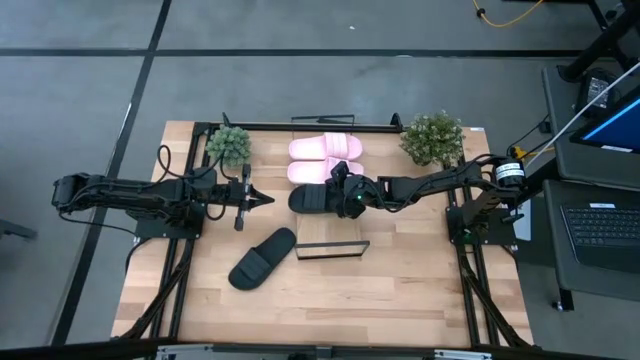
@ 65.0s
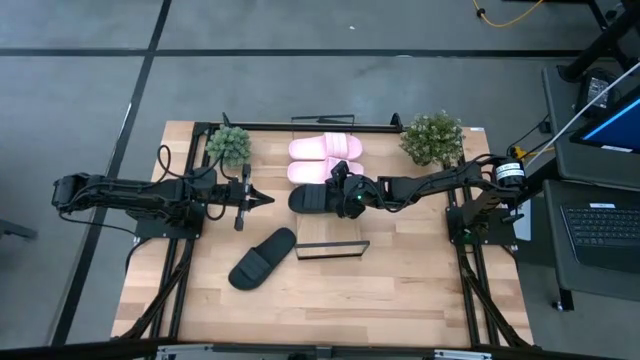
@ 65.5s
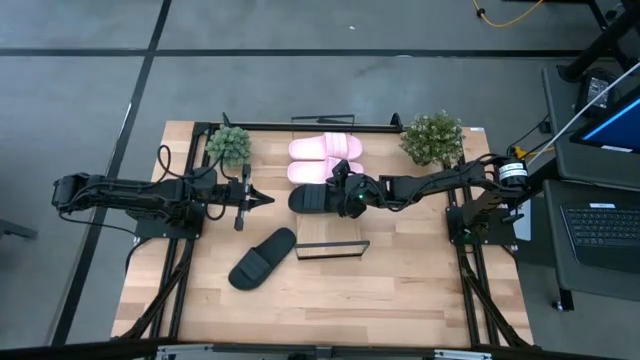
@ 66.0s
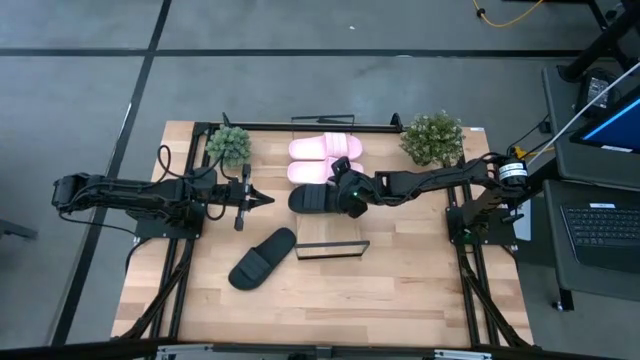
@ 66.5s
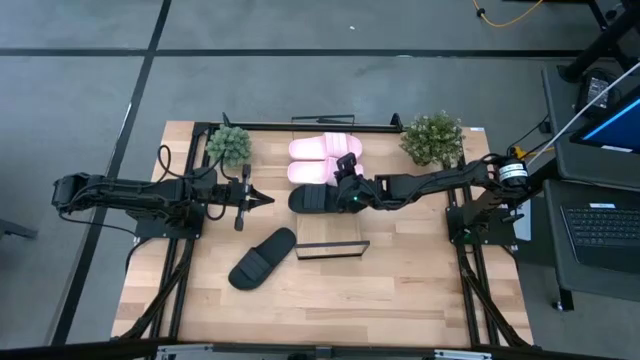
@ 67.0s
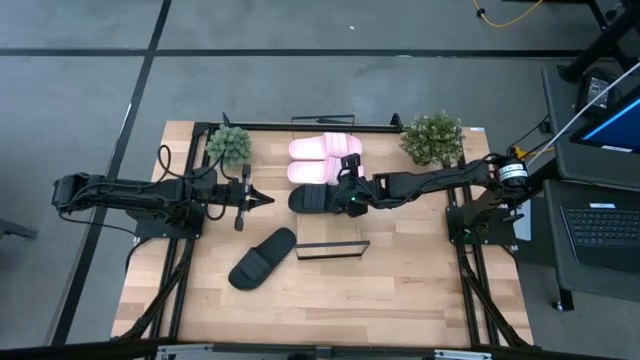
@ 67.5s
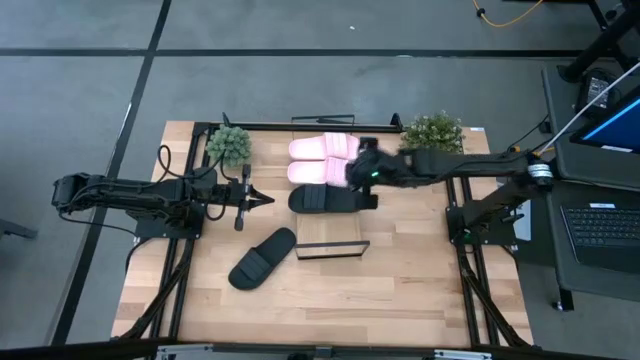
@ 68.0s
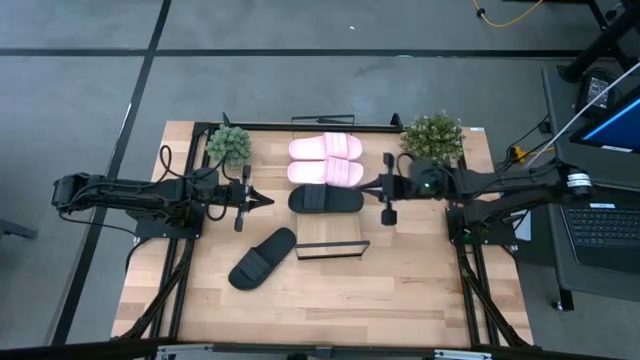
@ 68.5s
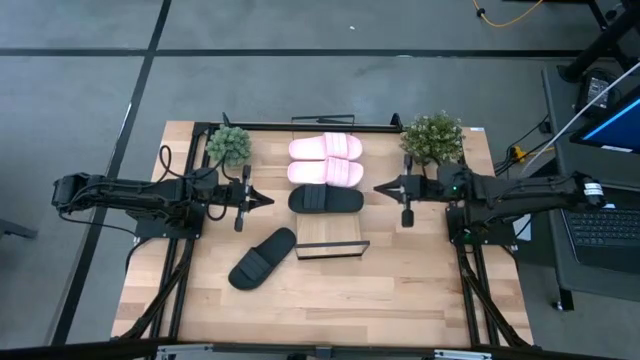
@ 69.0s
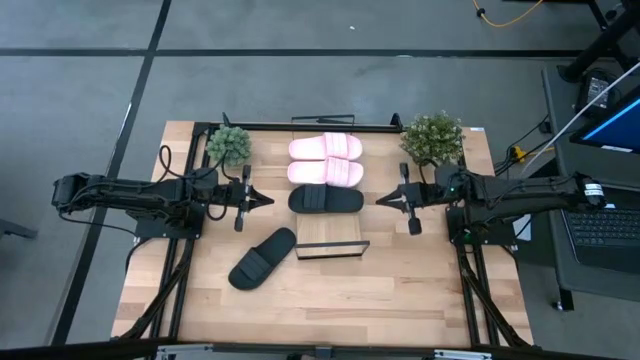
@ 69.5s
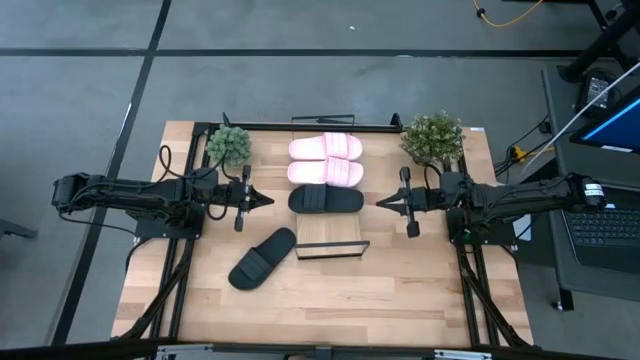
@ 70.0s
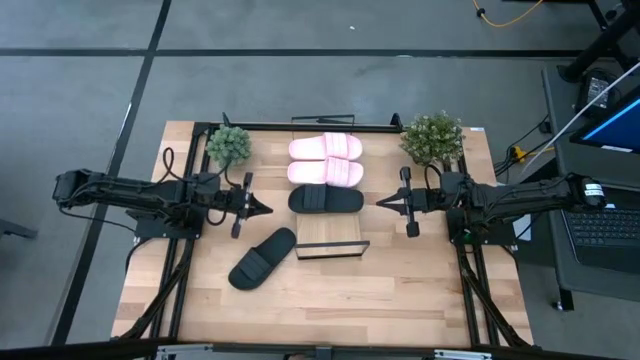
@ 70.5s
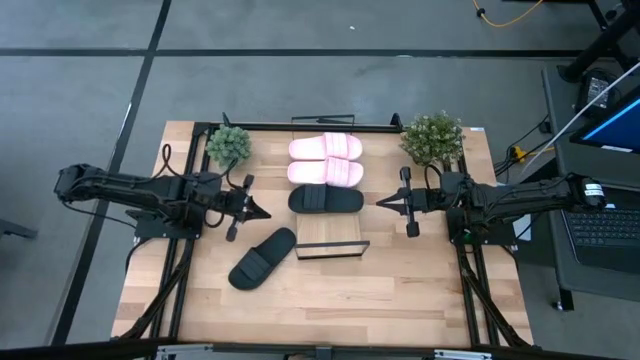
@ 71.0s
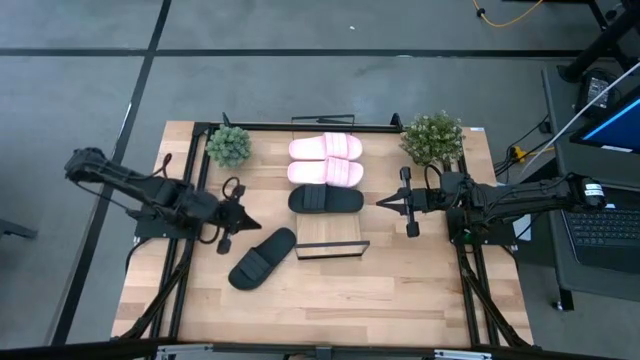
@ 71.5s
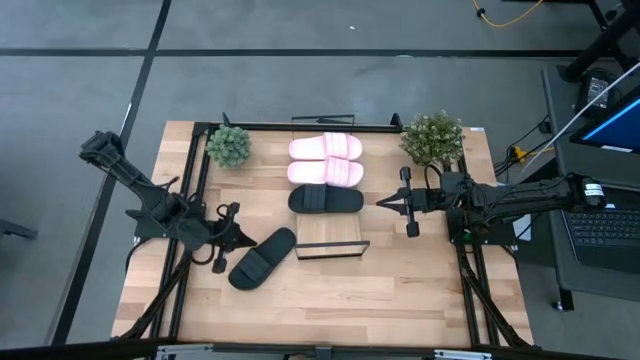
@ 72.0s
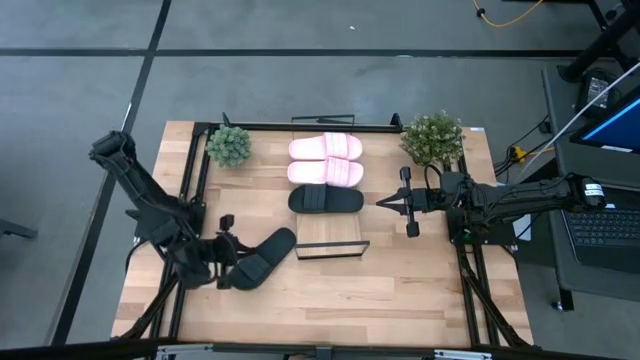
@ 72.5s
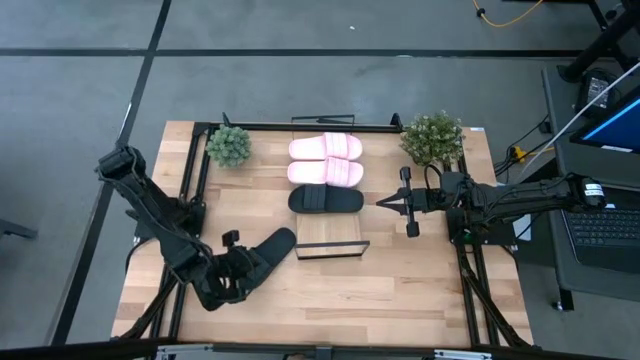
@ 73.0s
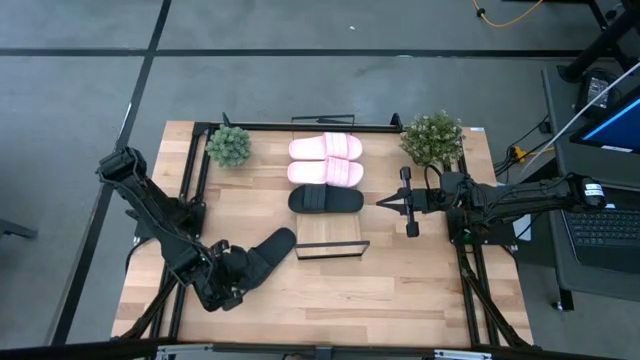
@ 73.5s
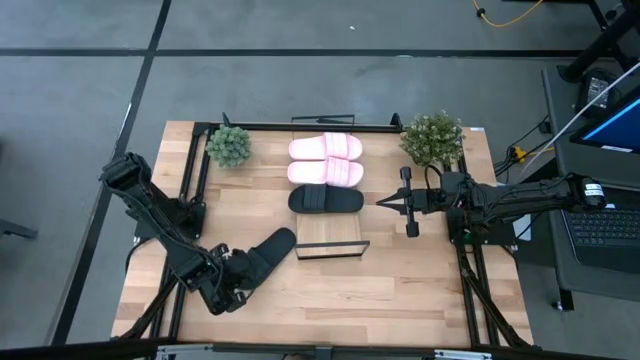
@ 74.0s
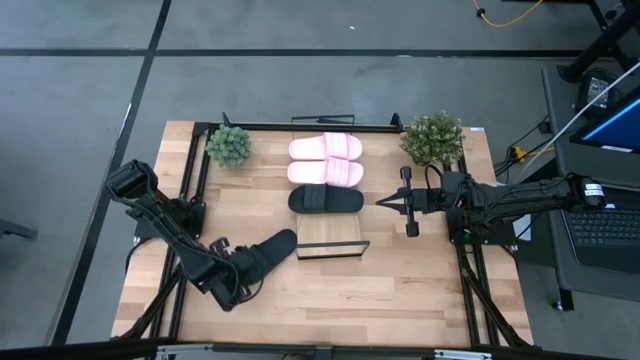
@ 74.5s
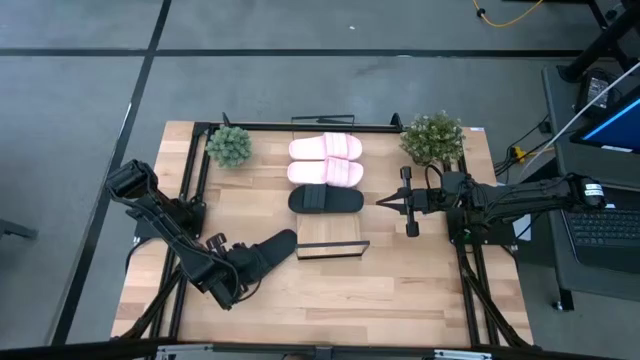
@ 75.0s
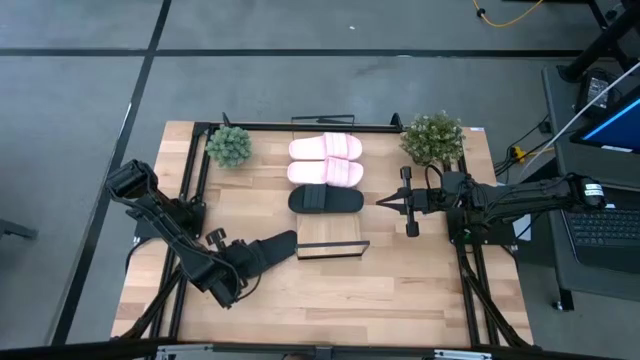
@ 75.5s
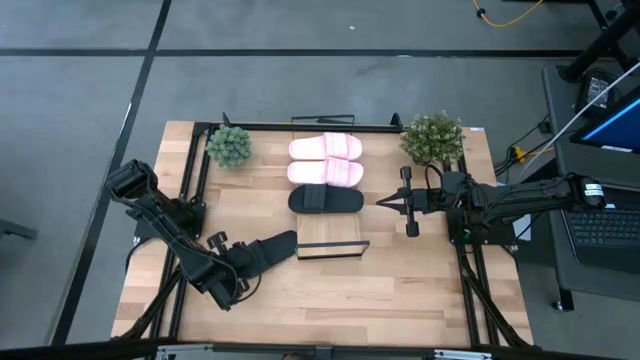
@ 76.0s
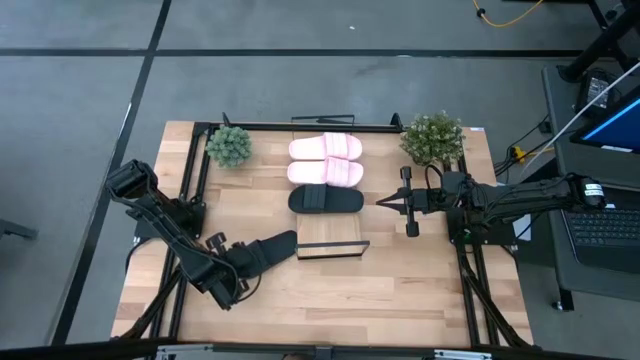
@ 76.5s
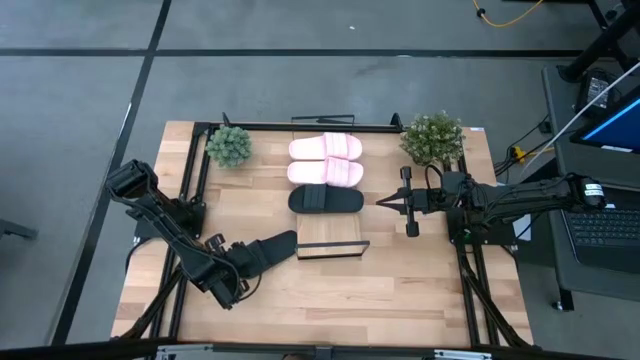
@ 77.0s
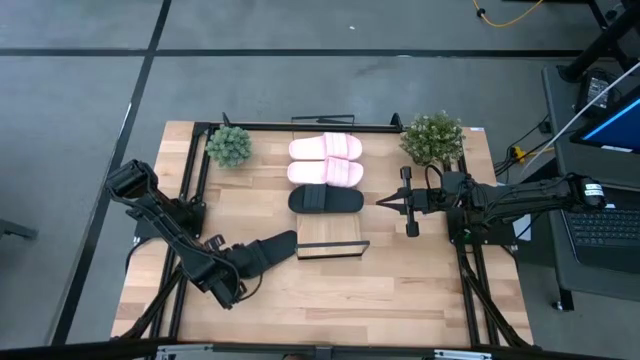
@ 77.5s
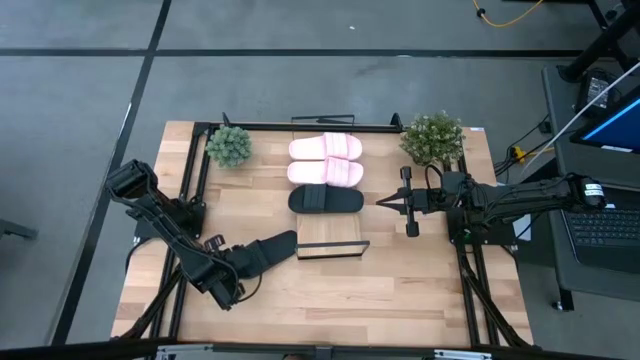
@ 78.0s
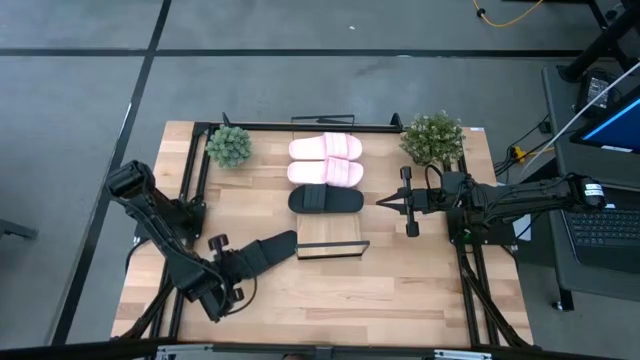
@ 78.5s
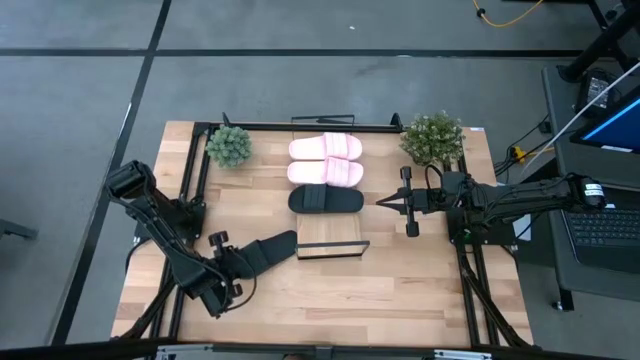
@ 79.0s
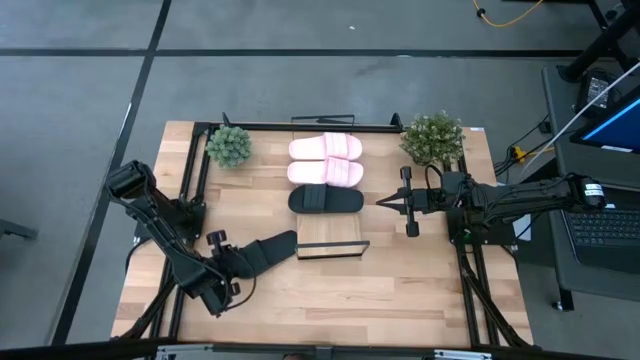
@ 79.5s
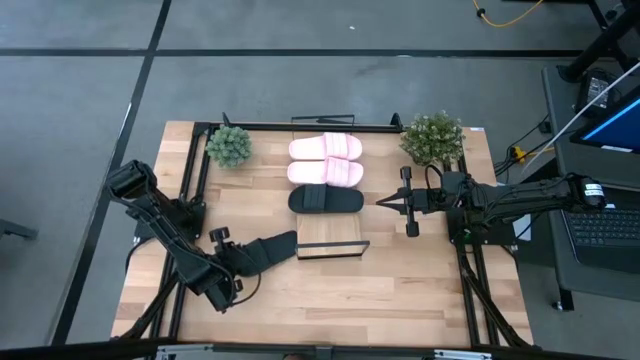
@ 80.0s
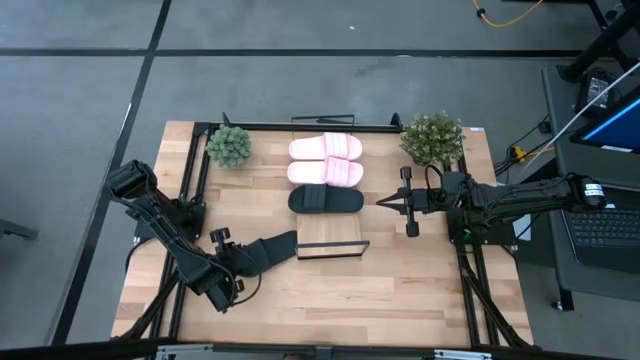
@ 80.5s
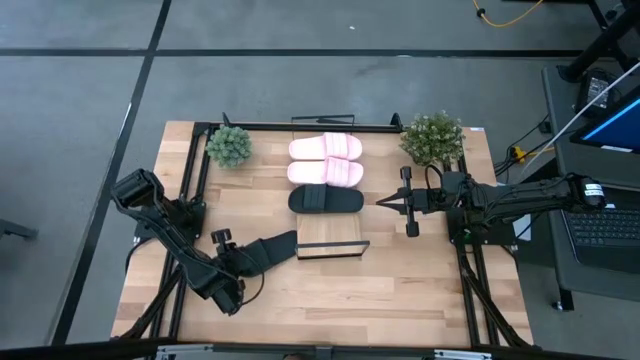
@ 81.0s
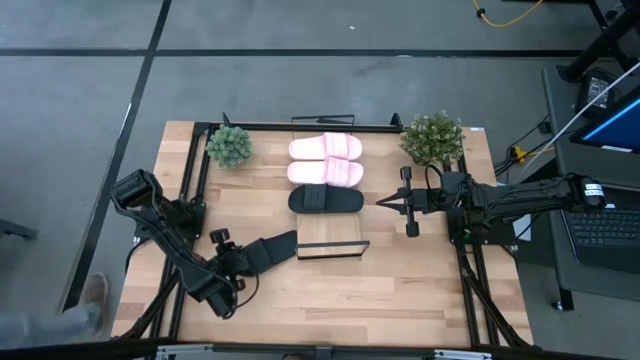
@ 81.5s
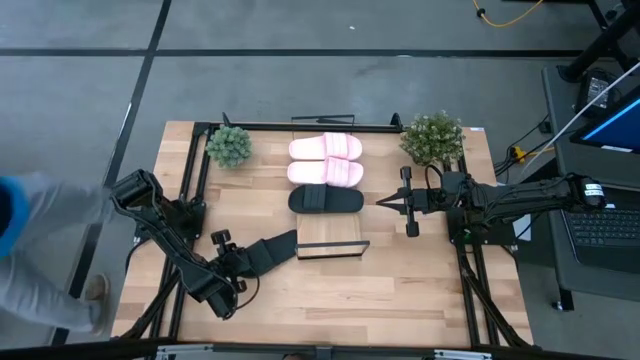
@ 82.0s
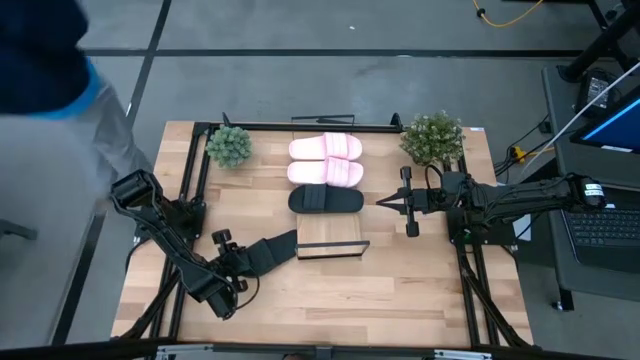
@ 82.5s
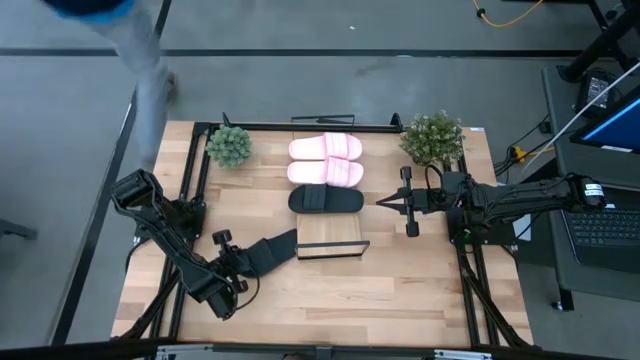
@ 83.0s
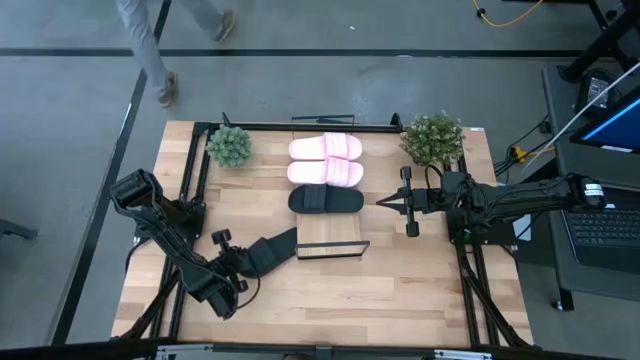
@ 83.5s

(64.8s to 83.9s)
Task: Pick and place slides into the shelf
Put the black slides on the shelf

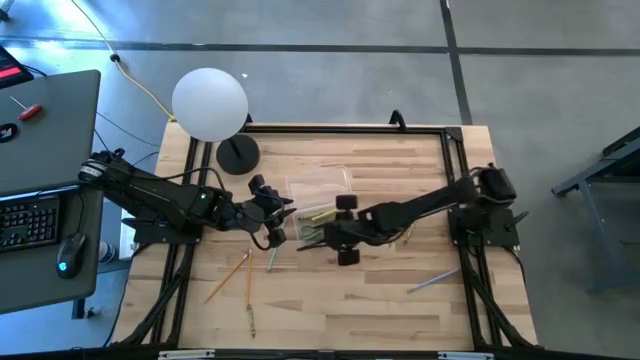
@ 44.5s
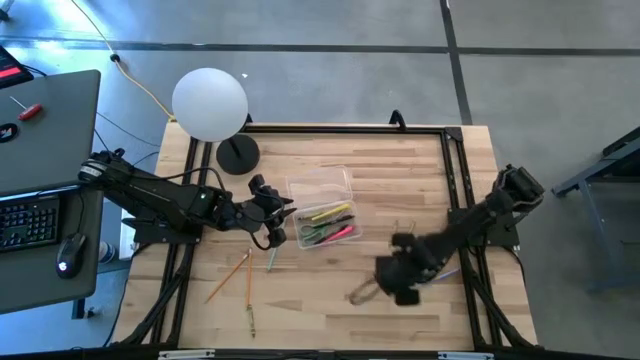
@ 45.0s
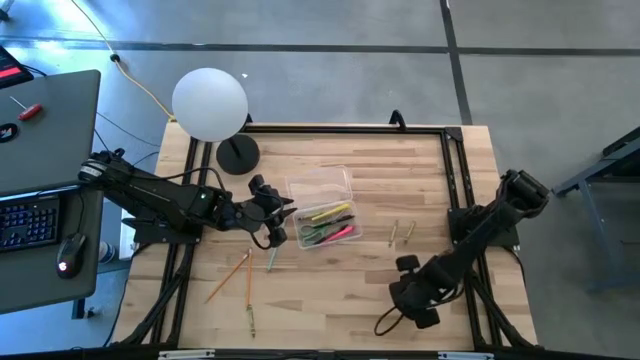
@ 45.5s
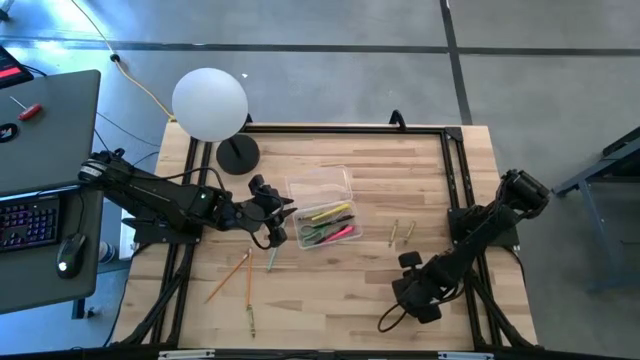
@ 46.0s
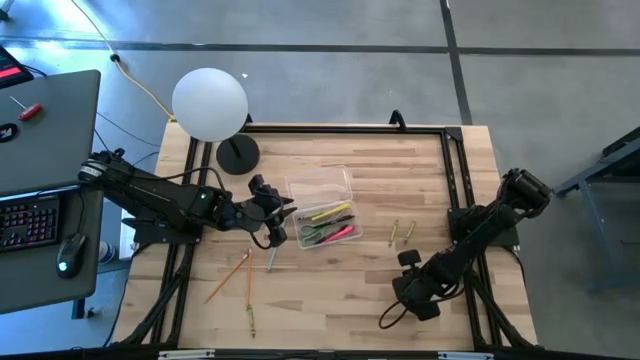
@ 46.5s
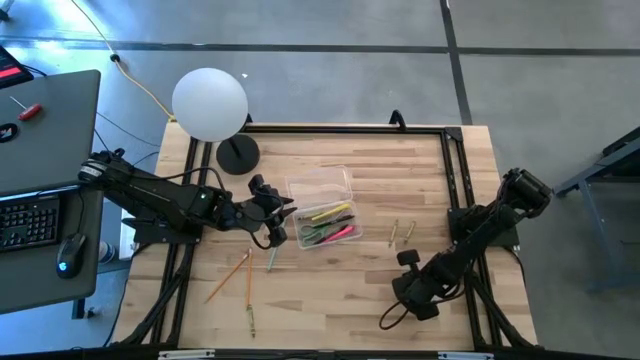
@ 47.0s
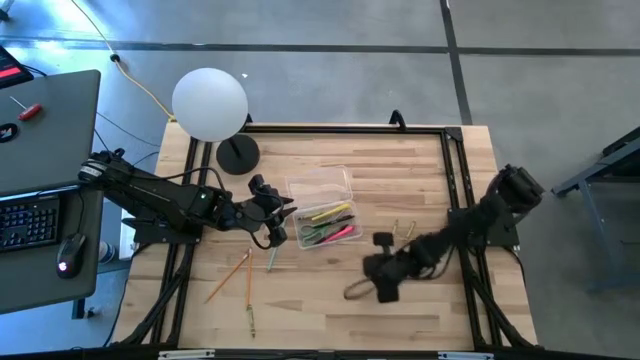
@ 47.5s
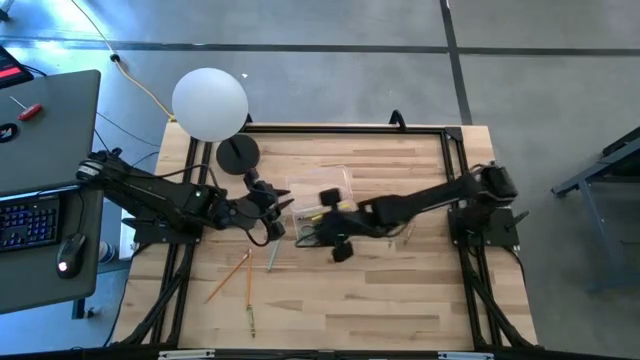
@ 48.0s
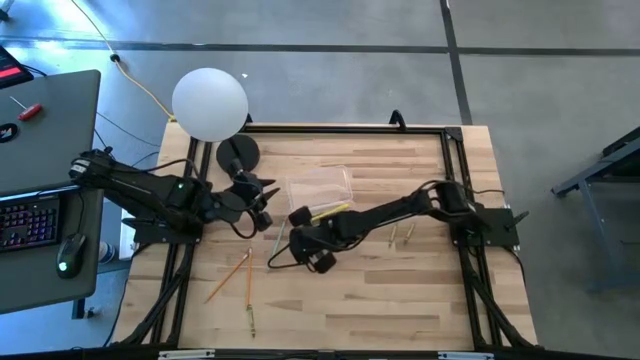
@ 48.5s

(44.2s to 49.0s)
Task: Pick & place school supplies into a supply box
Put the blue pencil into the transparent supply box
